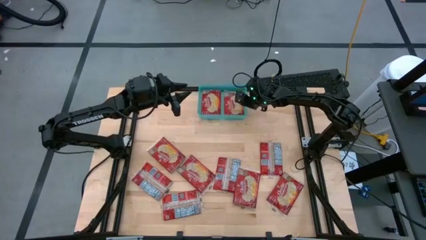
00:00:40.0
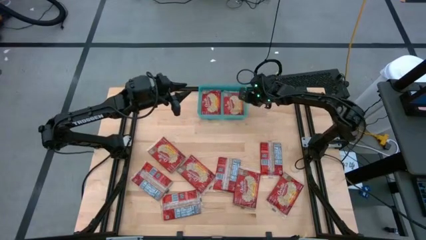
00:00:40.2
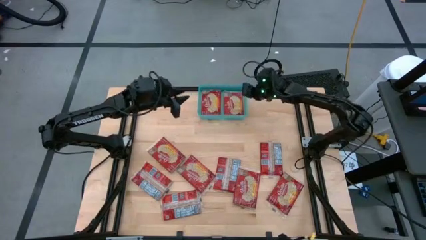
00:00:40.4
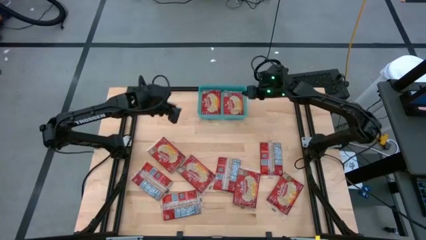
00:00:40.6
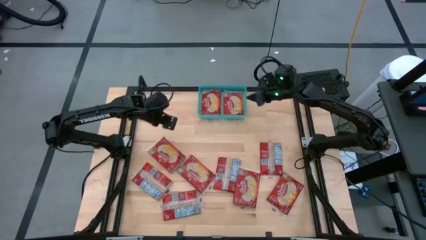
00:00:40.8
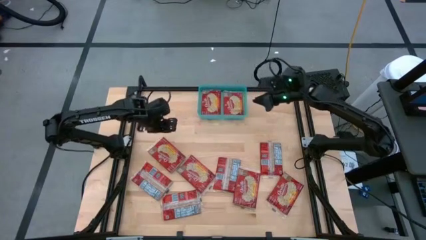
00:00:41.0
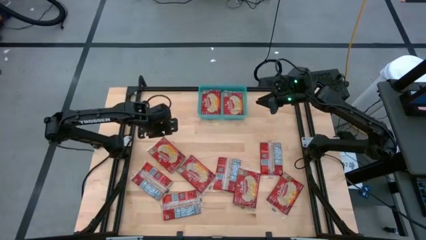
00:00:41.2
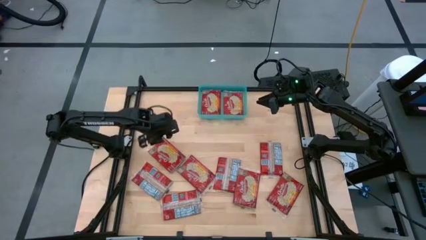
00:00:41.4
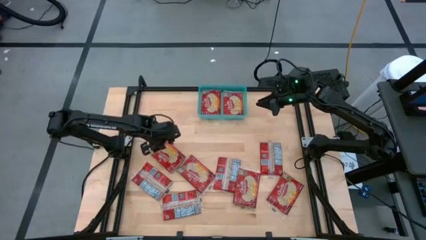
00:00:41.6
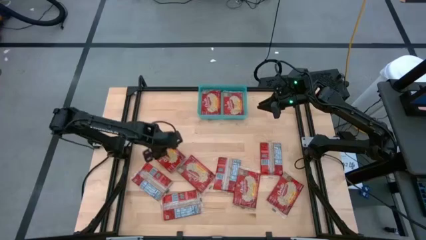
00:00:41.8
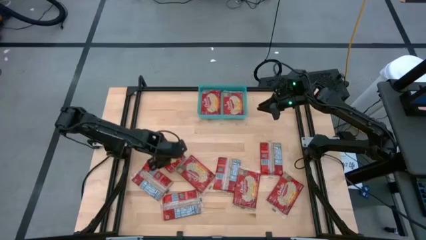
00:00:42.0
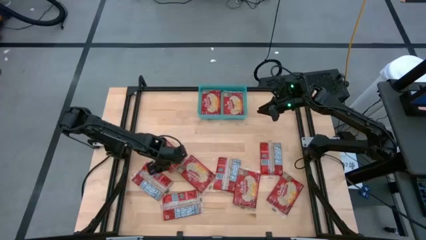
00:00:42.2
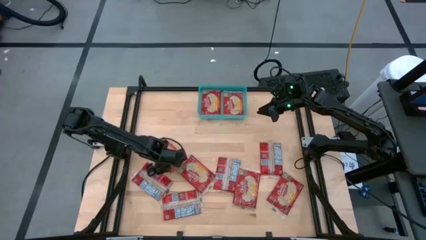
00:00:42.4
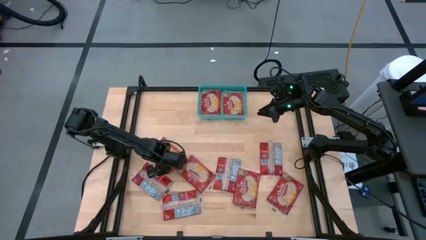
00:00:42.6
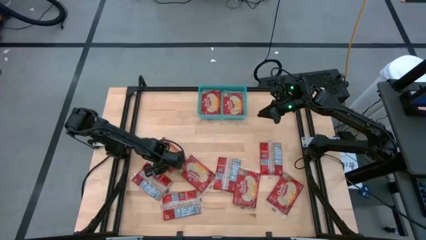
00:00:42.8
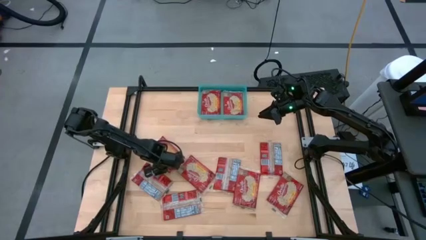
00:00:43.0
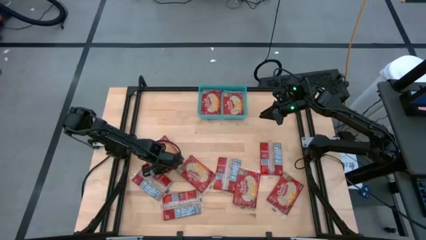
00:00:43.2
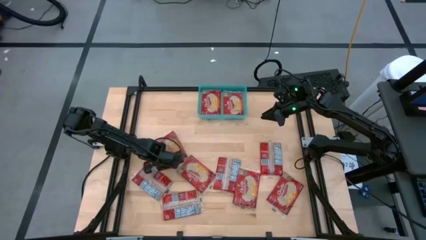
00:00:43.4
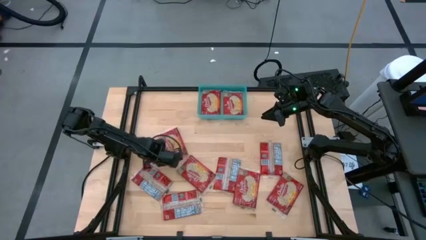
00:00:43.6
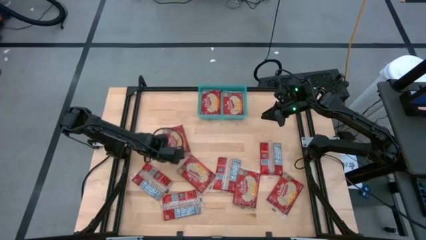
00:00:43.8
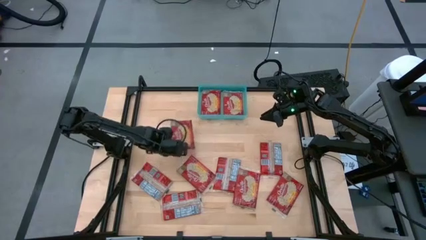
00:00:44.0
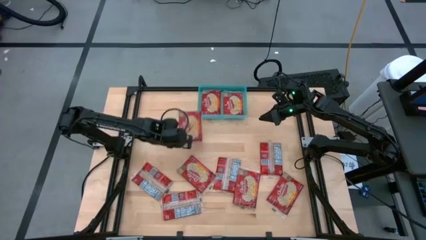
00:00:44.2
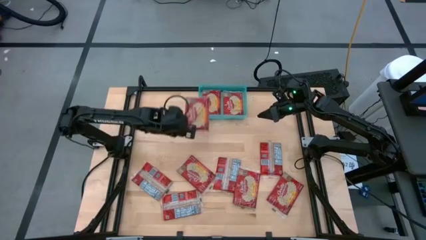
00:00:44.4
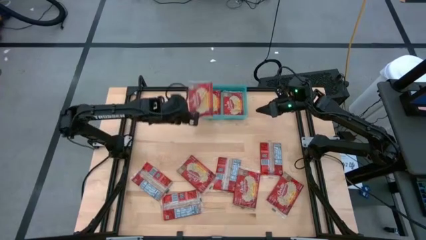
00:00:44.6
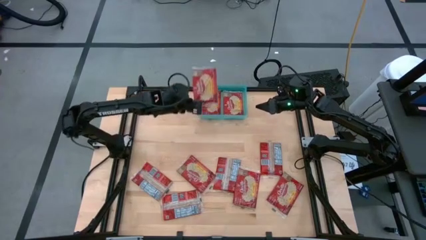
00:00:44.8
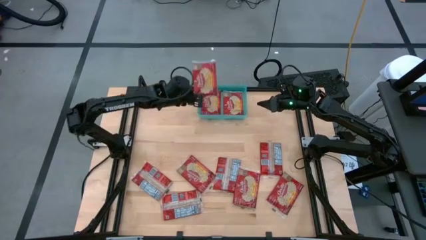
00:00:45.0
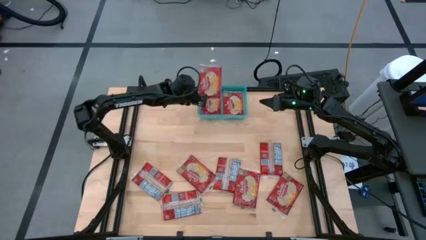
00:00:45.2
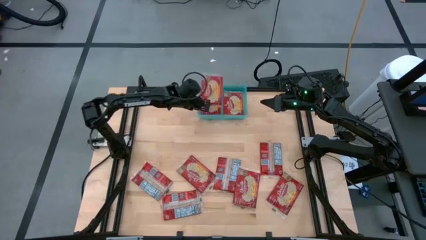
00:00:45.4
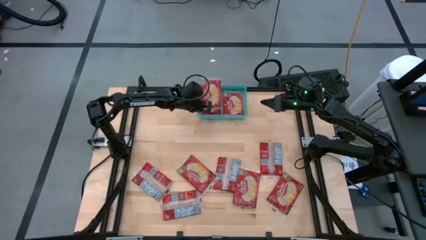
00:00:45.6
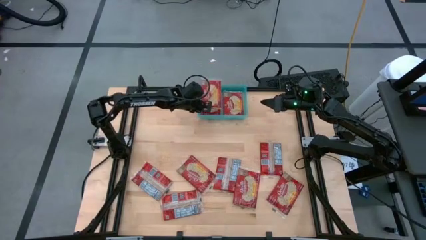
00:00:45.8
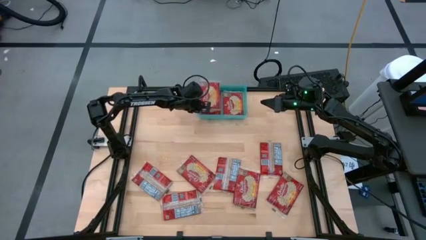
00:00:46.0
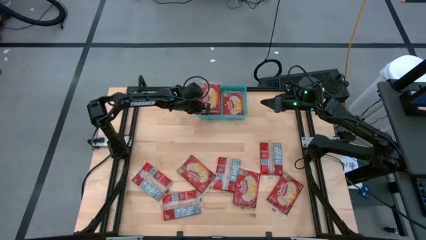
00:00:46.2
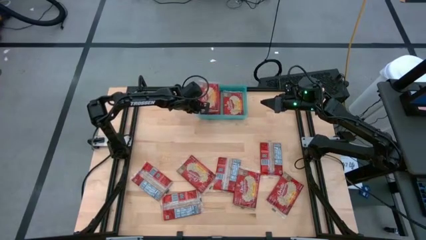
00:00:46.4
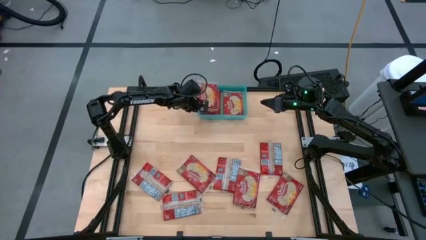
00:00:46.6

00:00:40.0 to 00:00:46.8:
Task: Sort popcorn bags into baskets
Put the red popcorn bag into the blue bin

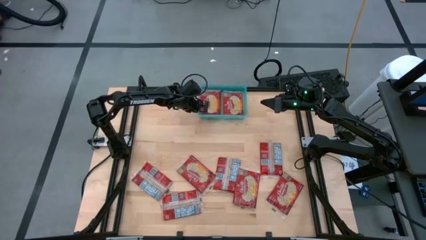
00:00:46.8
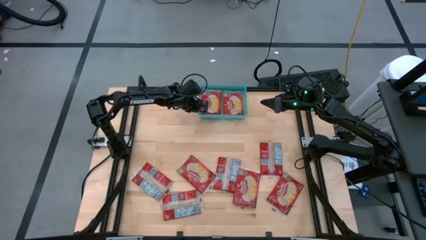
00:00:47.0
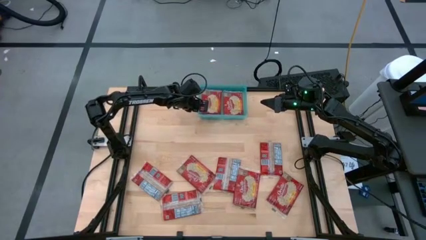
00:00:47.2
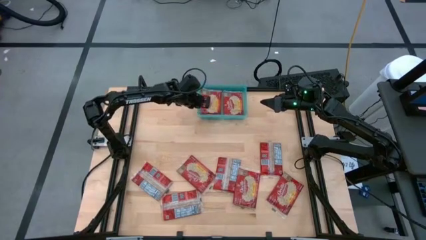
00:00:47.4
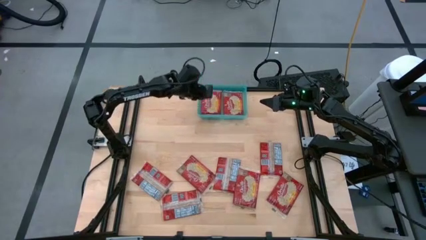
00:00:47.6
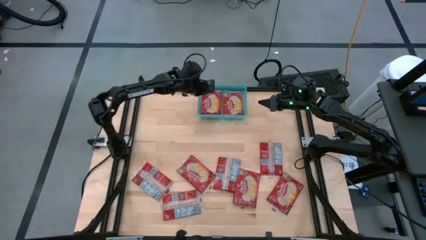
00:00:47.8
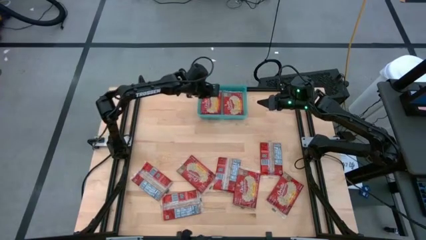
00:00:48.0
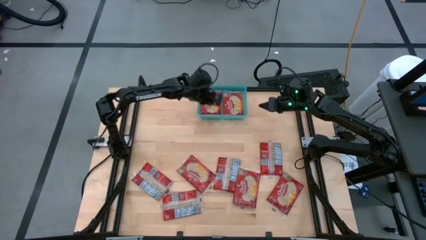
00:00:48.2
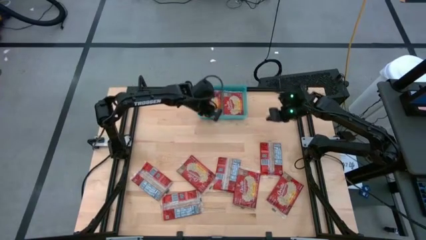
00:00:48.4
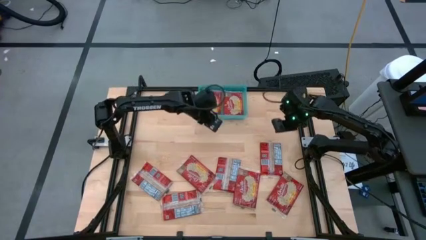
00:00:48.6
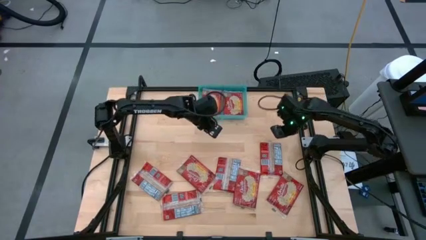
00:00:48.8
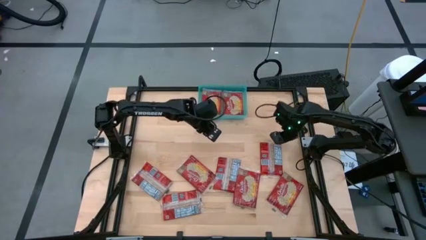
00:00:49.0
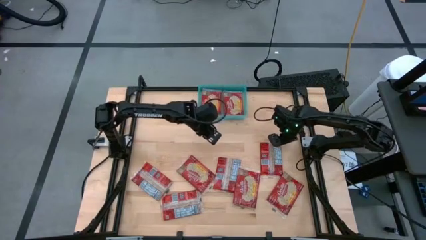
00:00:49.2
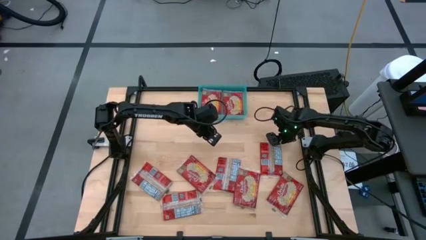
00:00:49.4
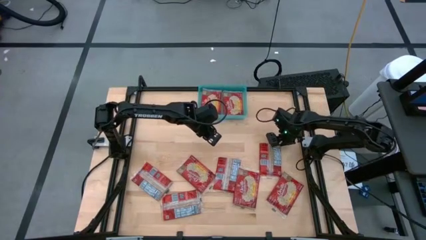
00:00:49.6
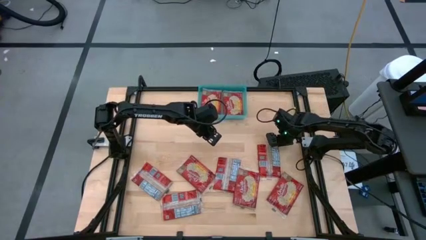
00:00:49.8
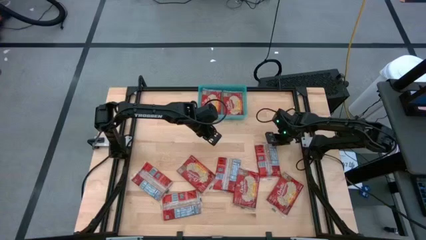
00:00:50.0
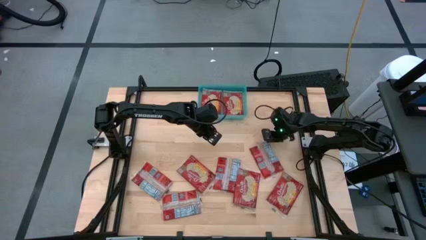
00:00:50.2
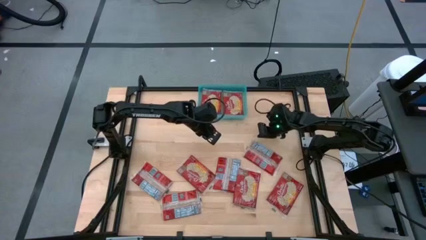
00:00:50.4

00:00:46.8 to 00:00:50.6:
Put the red popcorn bag into the blue bin
